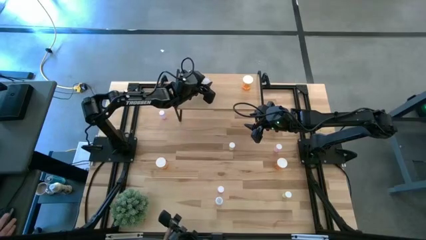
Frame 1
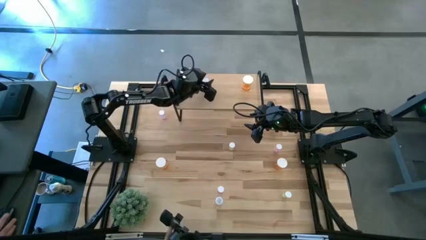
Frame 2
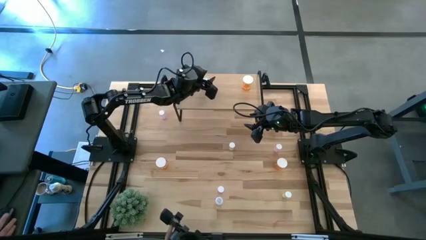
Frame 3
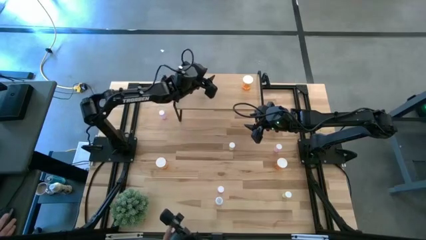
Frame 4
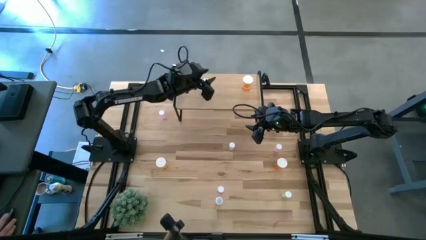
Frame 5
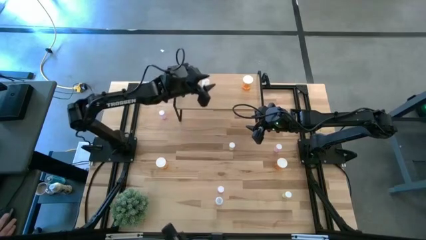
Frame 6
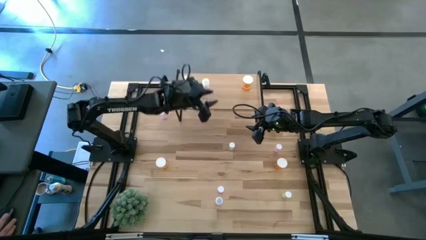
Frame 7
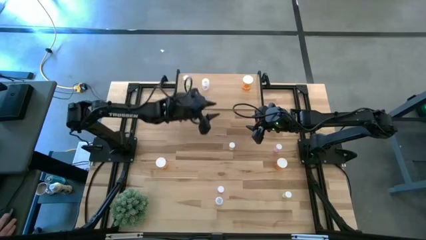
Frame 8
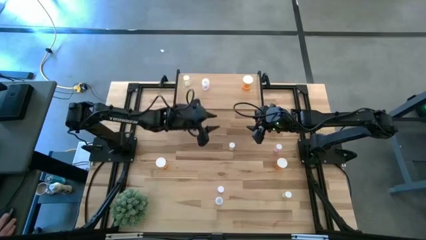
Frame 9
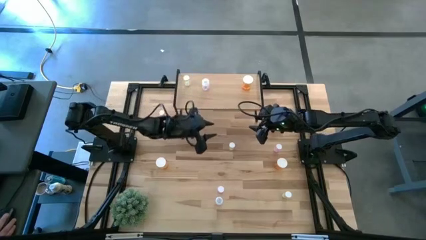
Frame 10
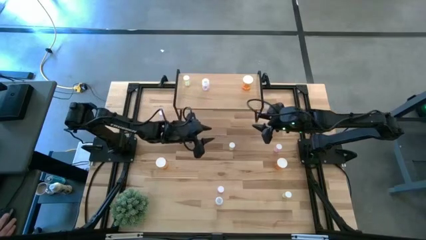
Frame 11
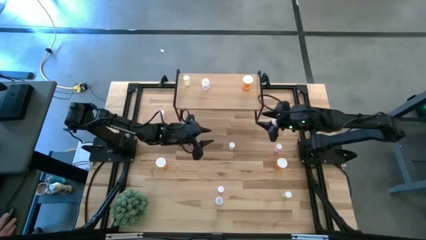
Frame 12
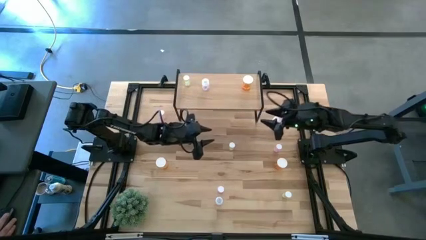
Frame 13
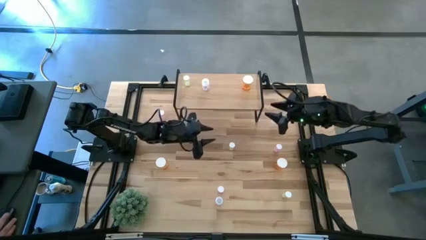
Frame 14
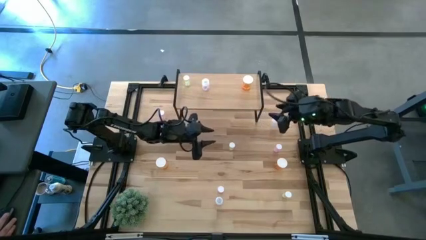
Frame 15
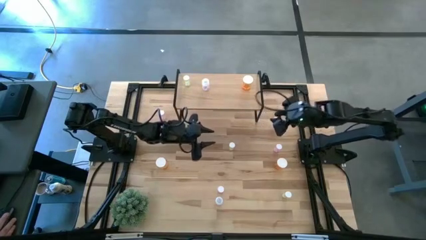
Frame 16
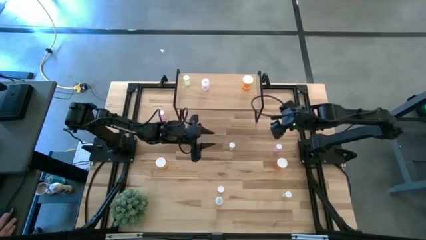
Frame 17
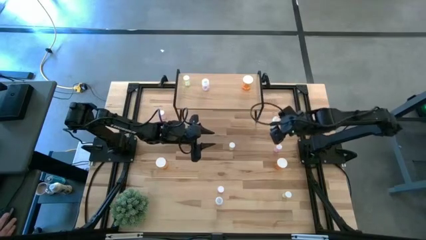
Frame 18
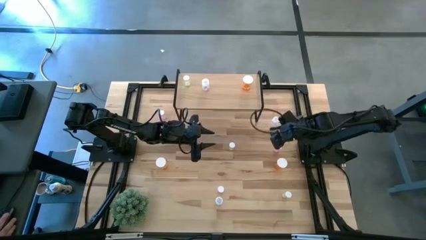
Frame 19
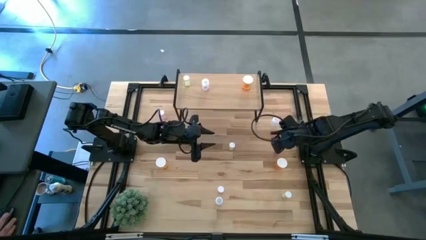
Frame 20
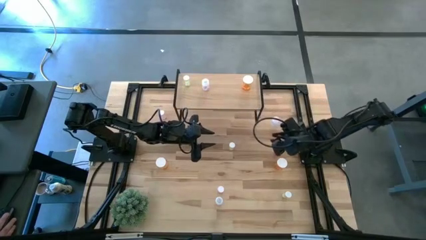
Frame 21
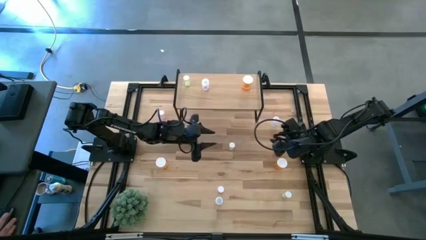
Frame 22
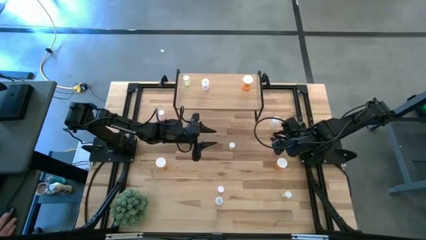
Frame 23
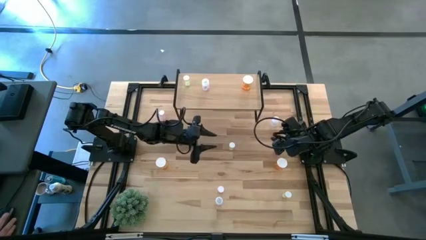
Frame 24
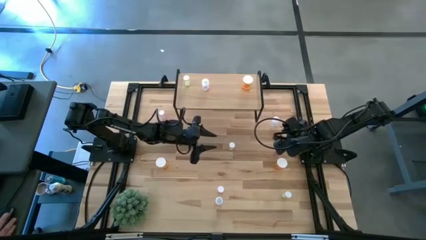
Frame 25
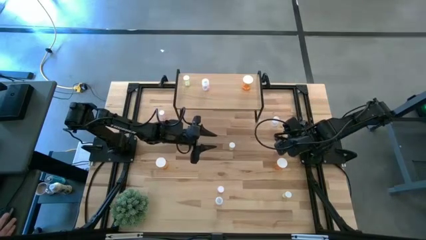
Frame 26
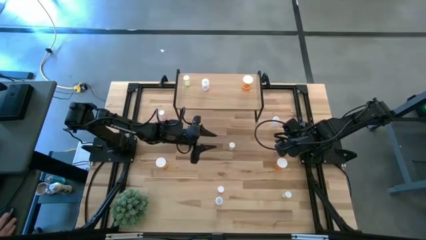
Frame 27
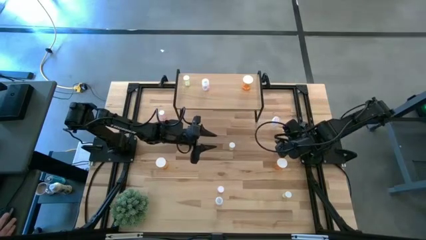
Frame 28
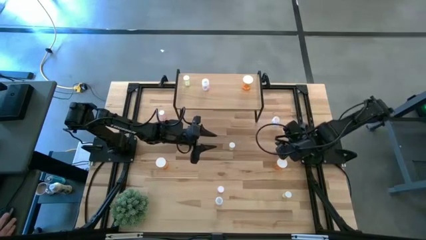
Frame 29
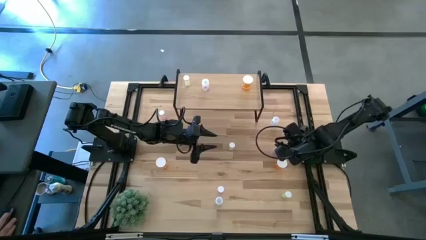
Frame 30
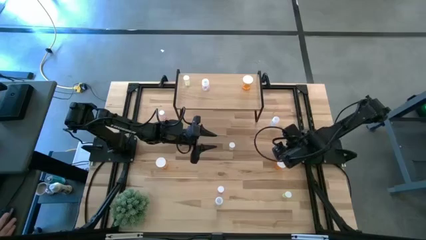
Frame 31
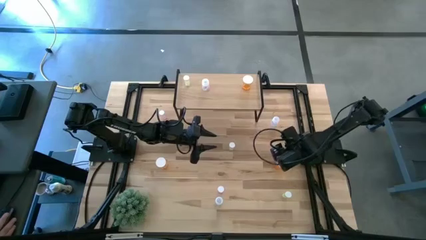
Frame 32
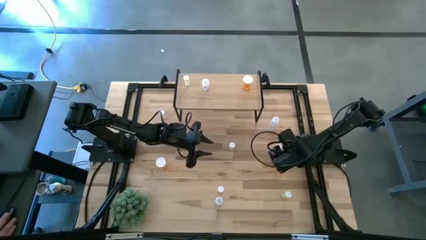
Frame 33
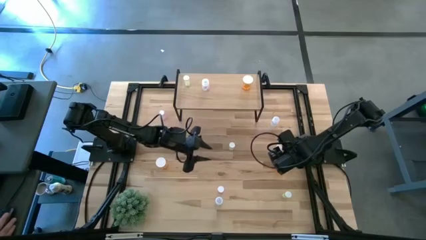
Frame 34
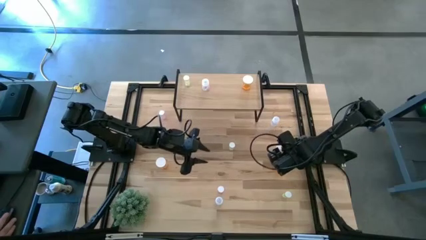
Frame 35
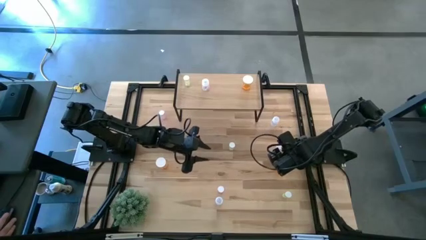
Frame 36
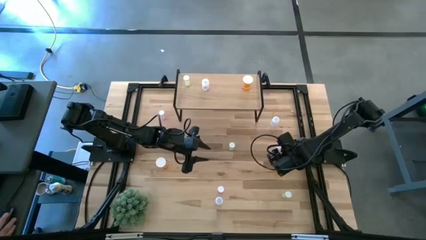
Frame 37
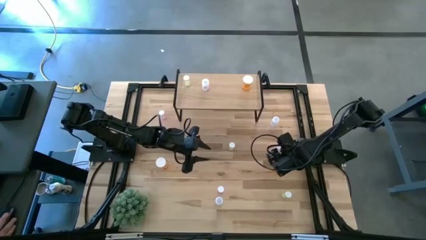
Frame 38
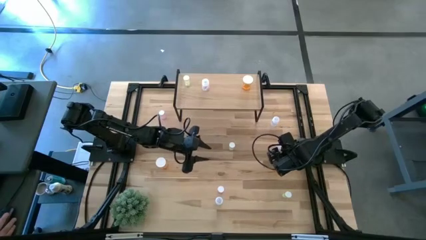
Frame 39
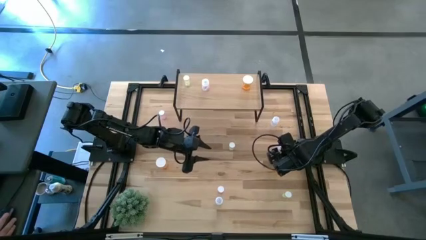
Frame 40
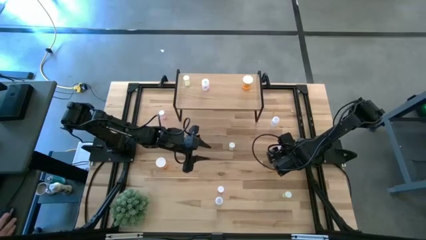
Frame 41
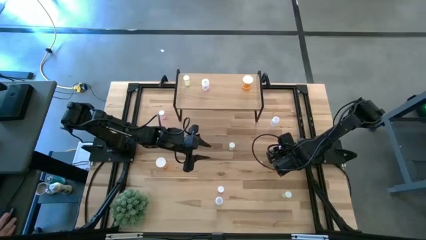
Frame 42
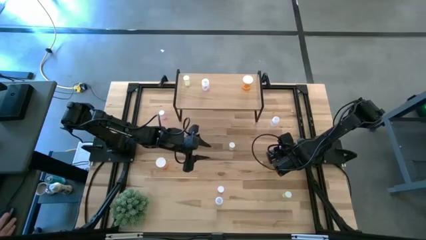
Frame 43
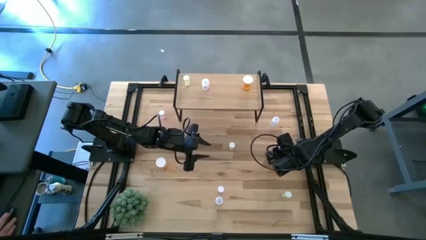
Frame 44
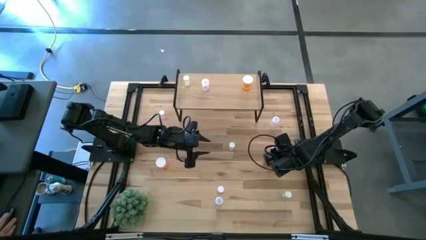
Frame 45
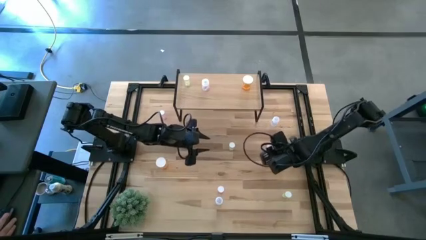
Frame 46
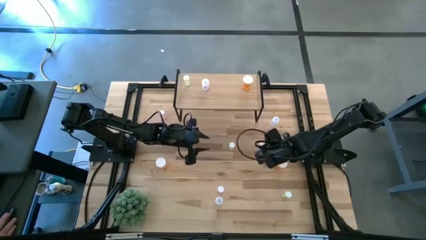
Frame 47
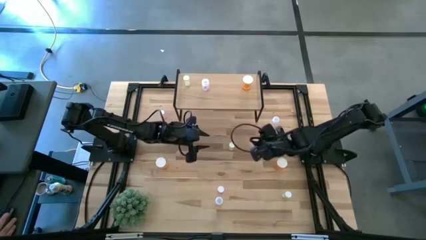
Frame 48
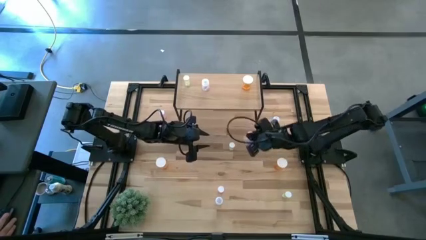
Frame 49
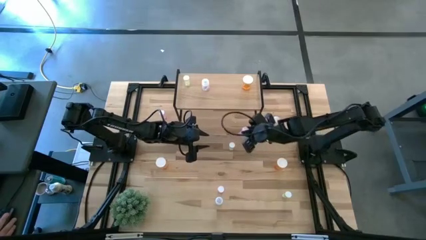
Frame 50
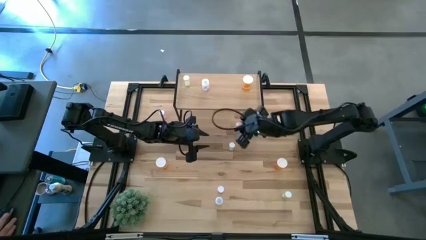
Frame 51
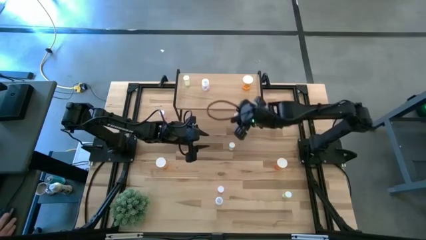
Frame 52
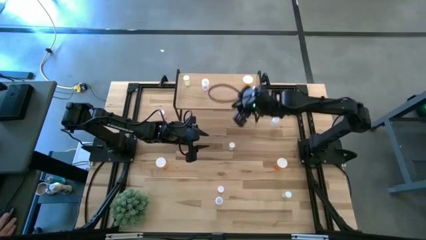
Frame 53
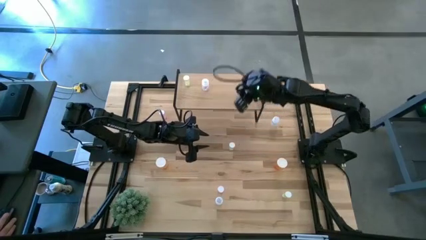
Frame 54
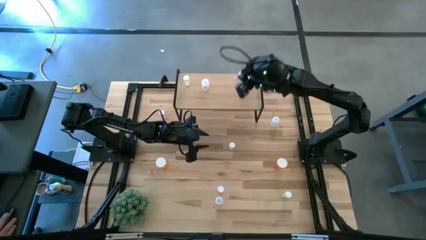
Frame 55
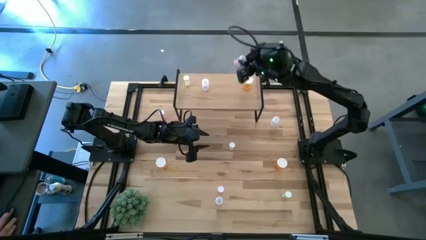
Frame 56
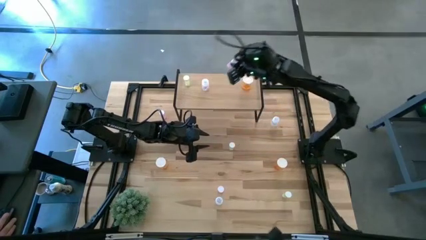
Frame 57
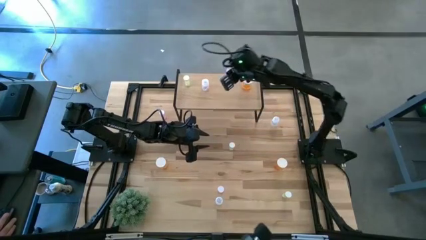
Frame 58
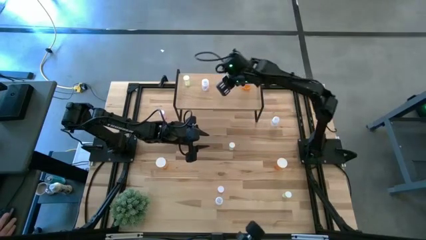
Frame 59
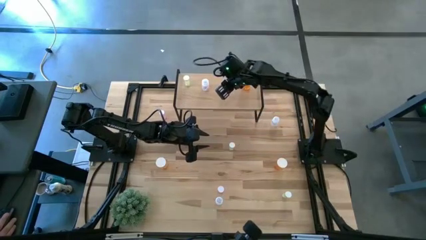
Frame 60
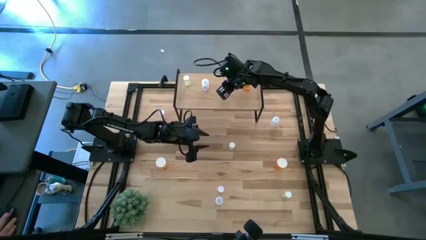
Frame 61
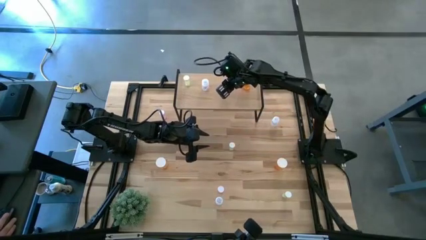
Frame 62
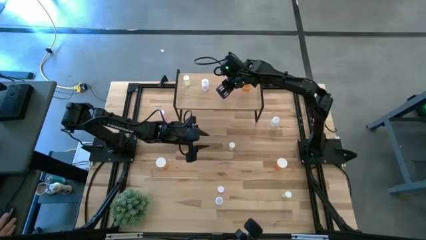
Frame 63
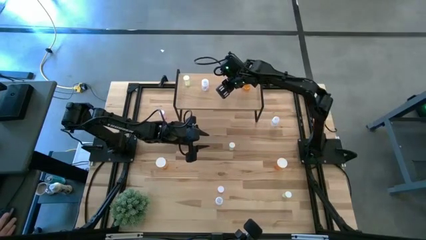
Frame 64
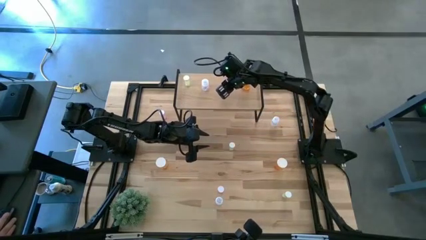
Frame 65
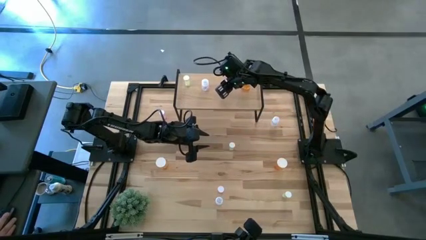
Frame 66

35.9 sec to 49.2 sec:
Task: Pick and place medicine bottles onto shelf by color
Put the right pink pill bottle on the shelf

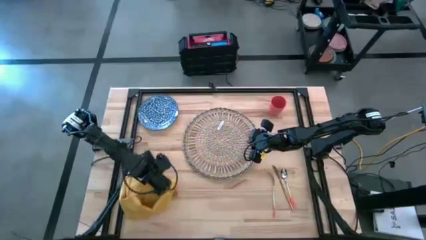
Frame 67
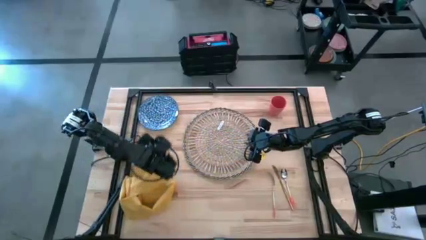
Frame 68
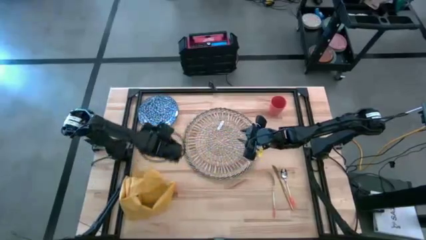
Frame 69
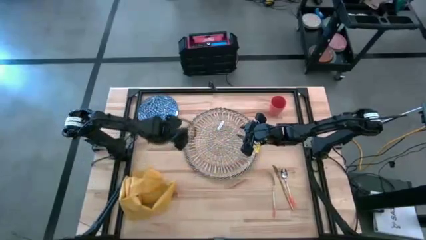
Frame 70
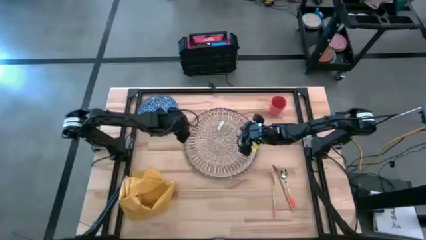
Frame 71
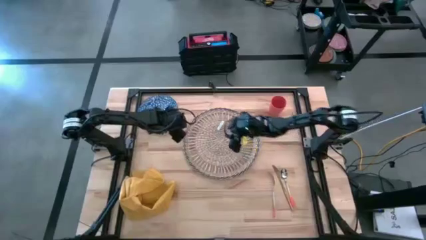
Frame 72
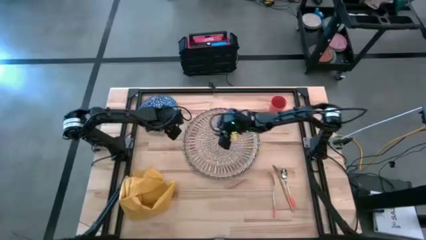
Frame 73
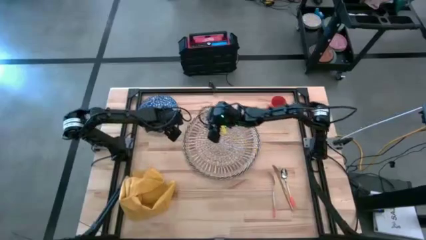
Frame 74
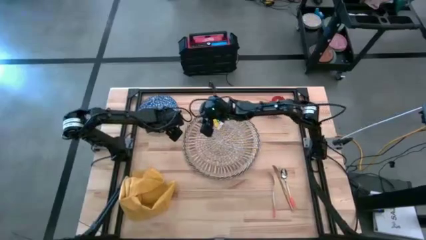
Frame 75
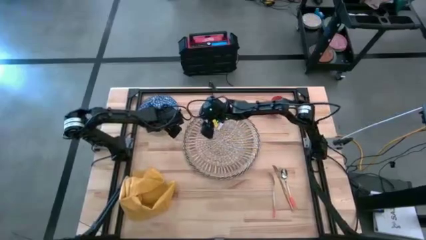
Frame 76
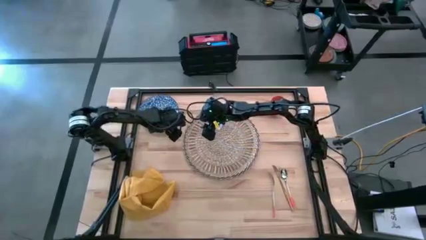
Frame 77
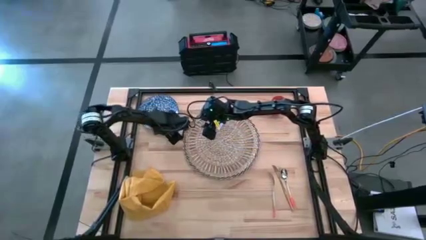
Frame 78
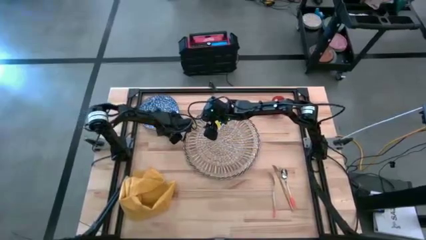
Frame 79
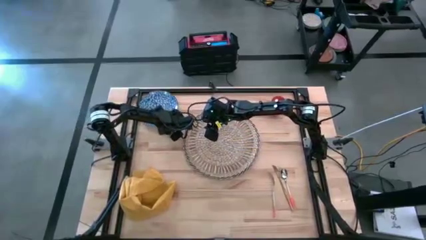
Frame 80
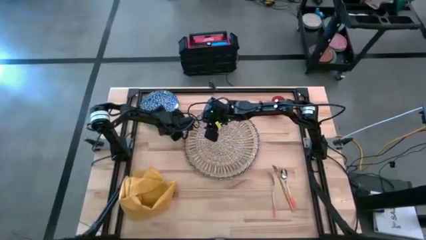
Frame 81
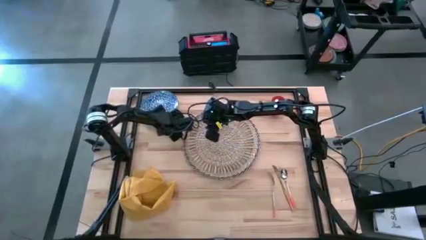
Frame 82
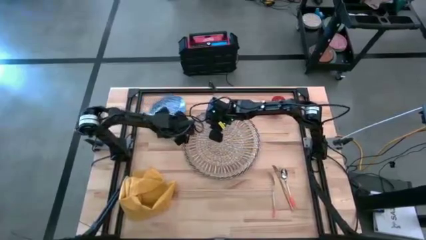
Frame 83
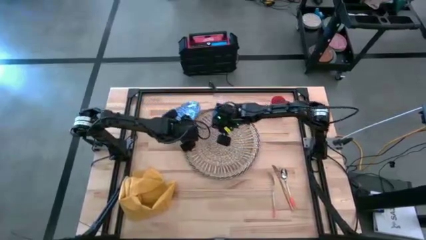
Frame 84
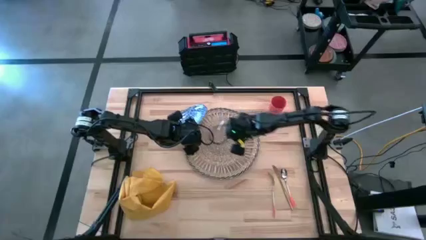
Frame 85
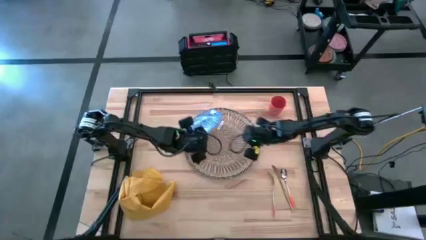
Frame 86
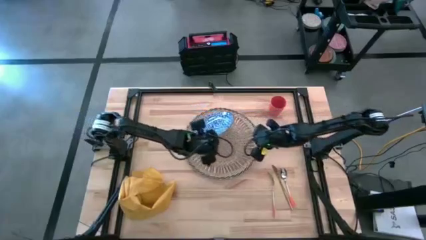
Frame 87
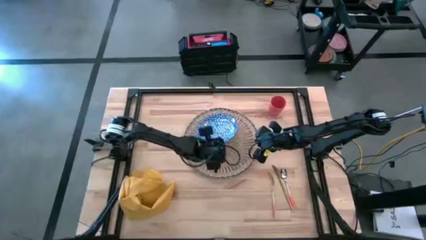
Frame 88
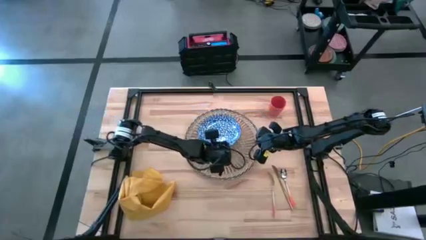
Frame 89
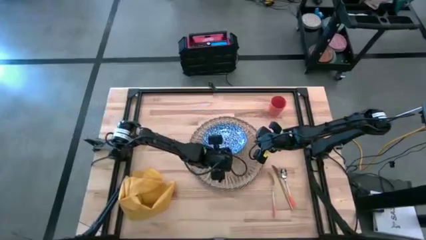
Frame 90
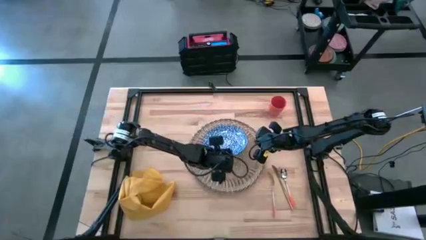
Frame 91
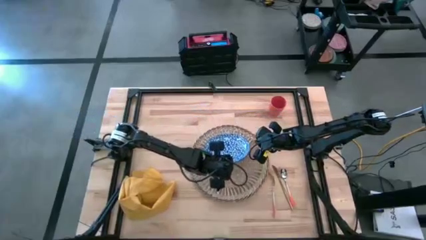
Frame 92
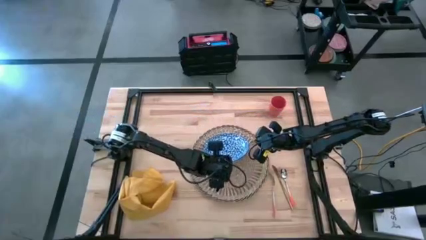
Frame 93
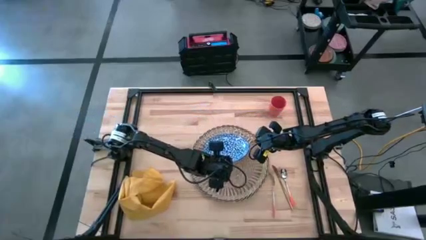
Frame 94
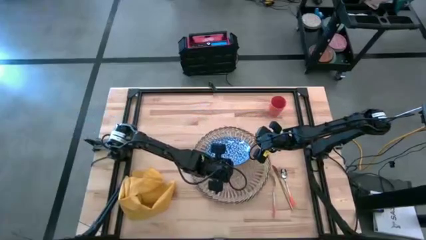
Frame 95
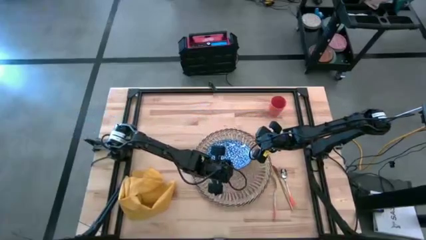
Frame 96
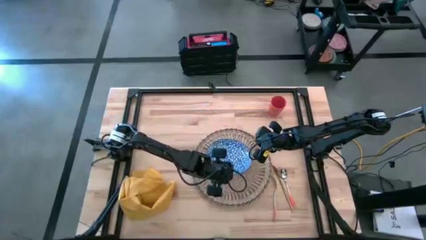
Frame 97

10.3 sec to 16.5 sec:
Task: Set table place
Put the blue plate on the brown placemat
